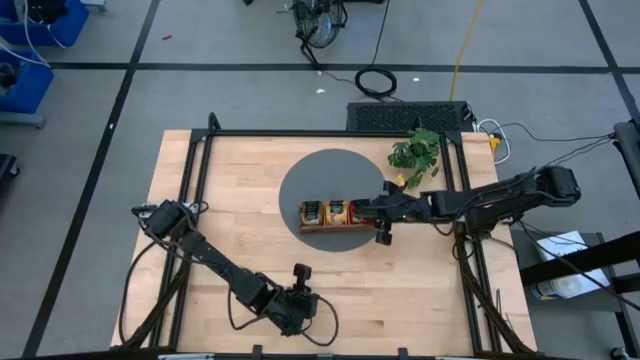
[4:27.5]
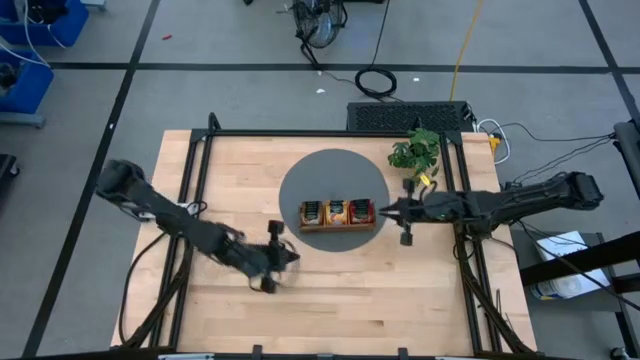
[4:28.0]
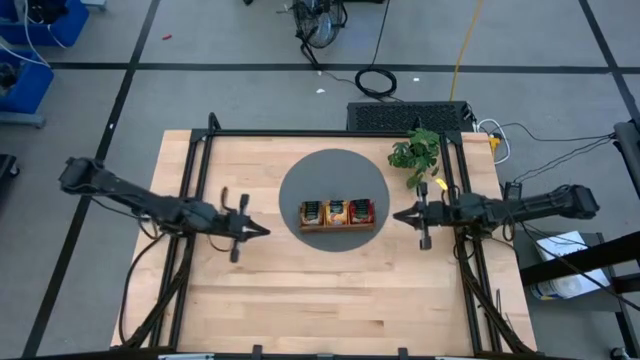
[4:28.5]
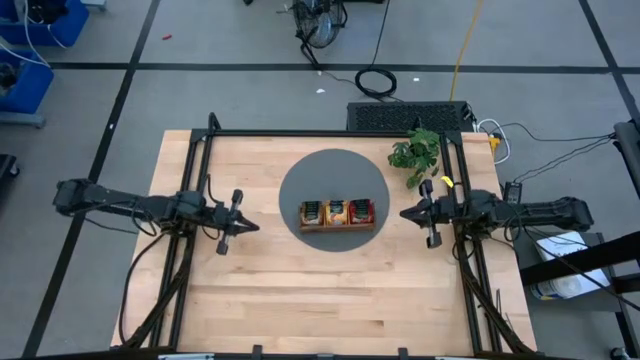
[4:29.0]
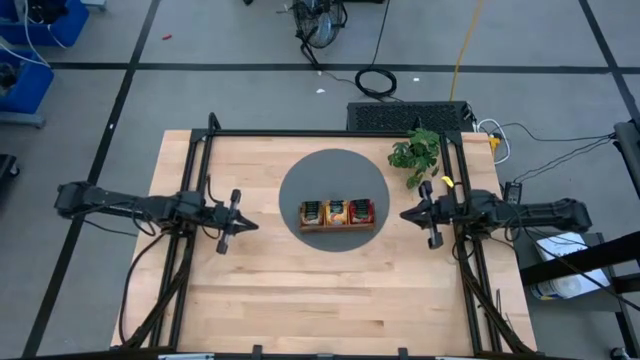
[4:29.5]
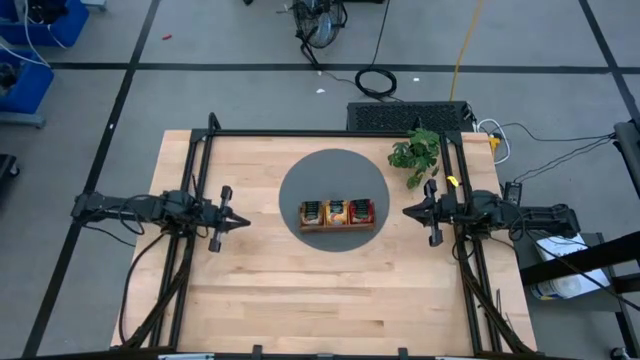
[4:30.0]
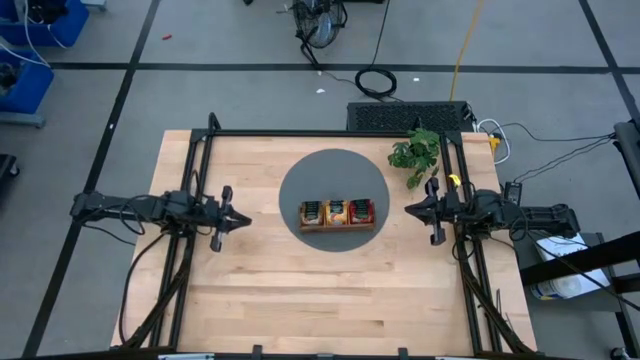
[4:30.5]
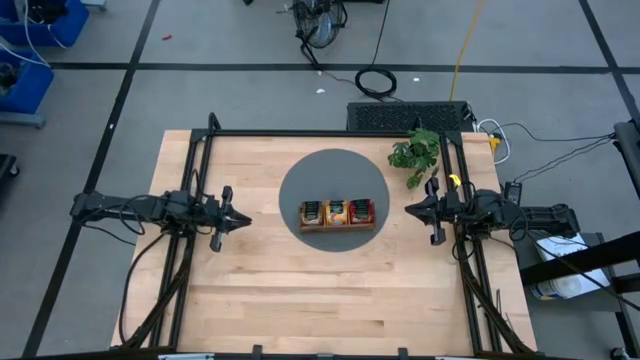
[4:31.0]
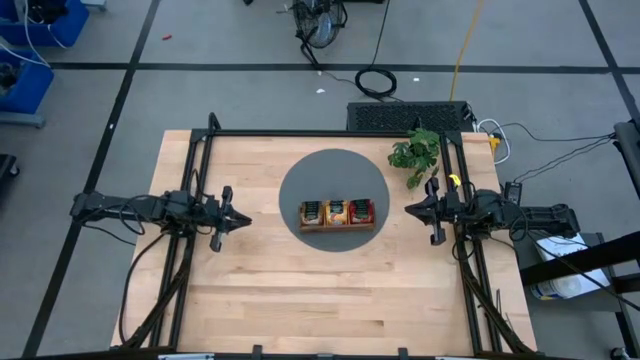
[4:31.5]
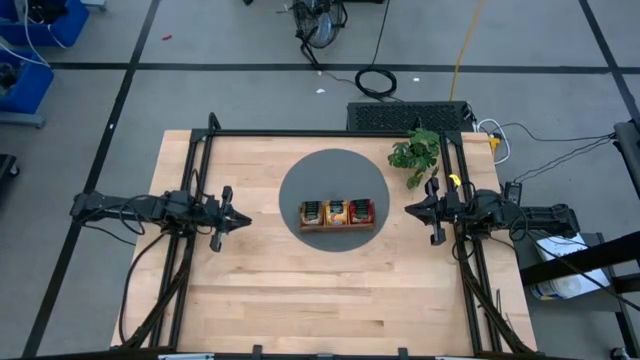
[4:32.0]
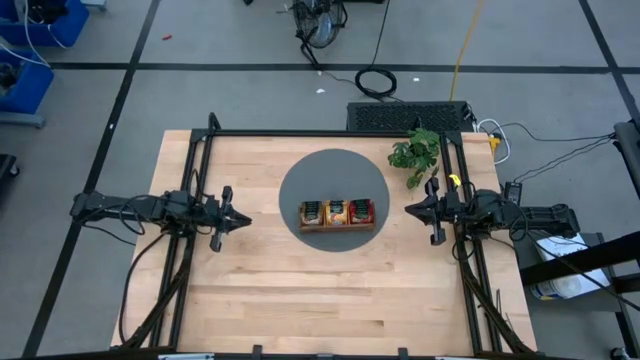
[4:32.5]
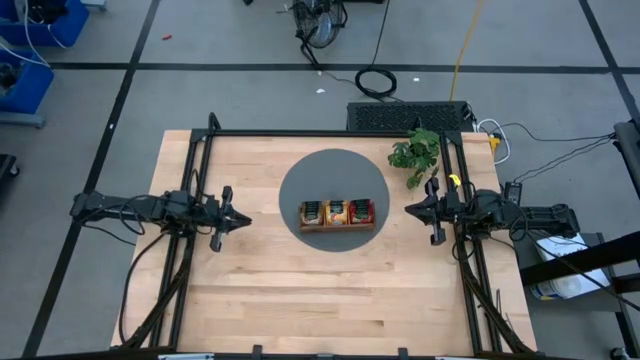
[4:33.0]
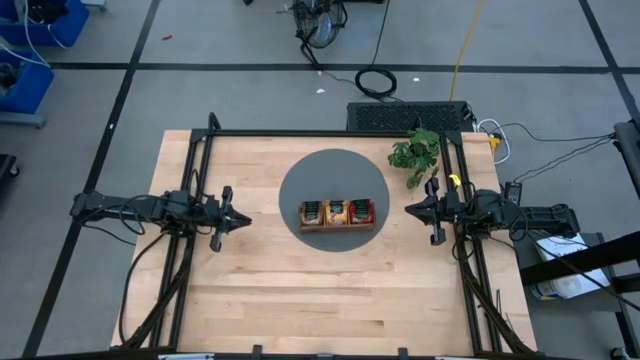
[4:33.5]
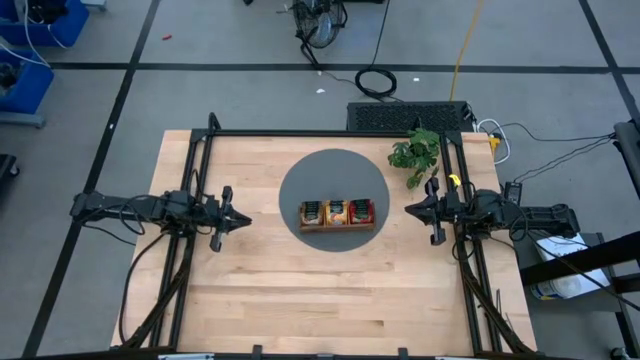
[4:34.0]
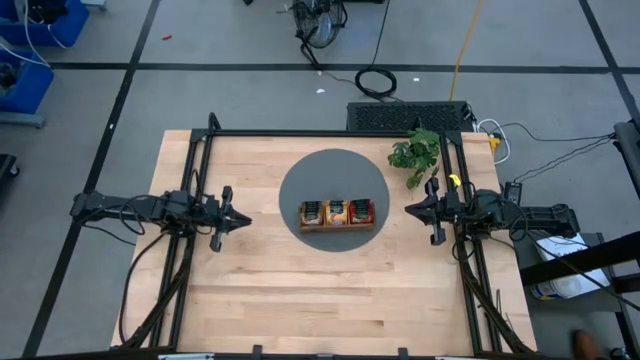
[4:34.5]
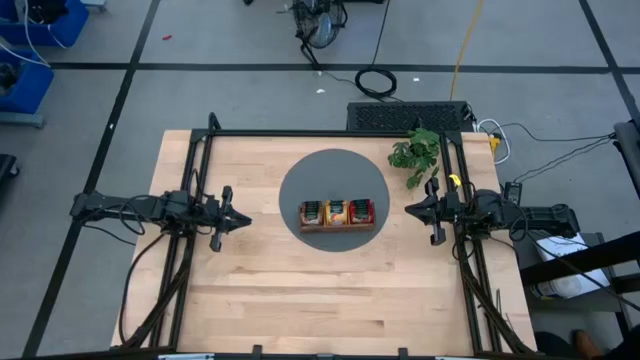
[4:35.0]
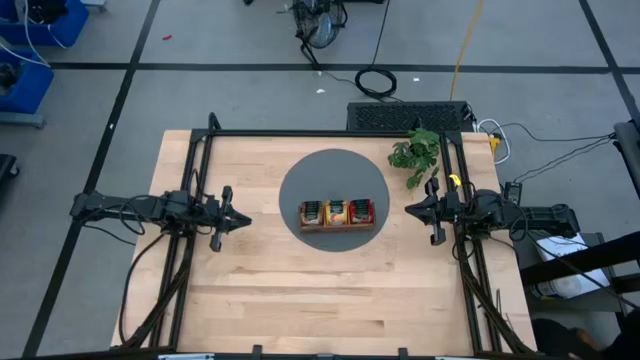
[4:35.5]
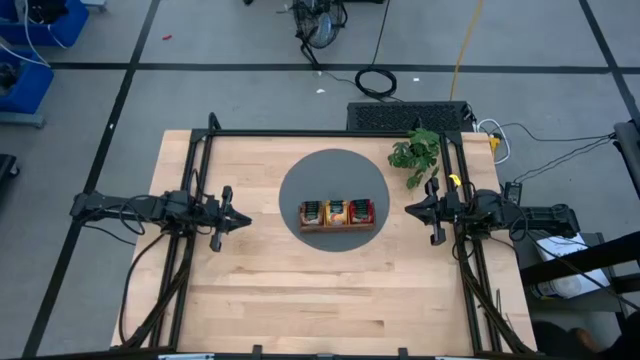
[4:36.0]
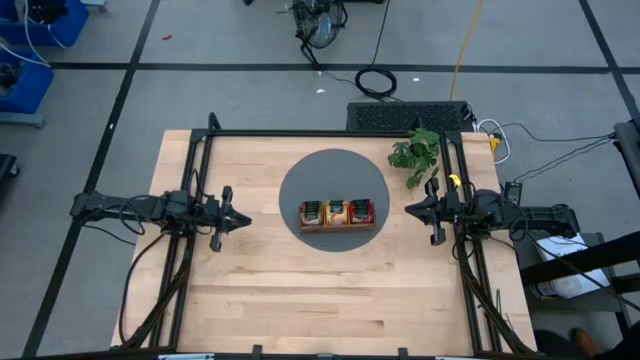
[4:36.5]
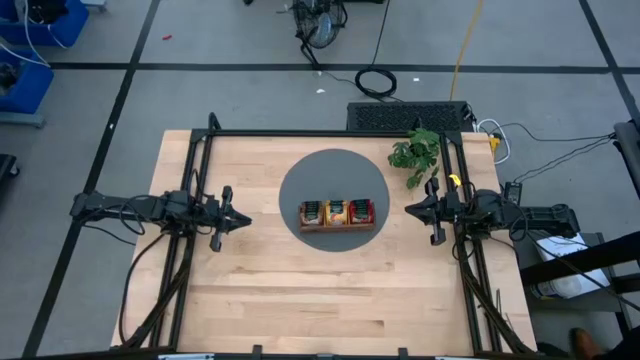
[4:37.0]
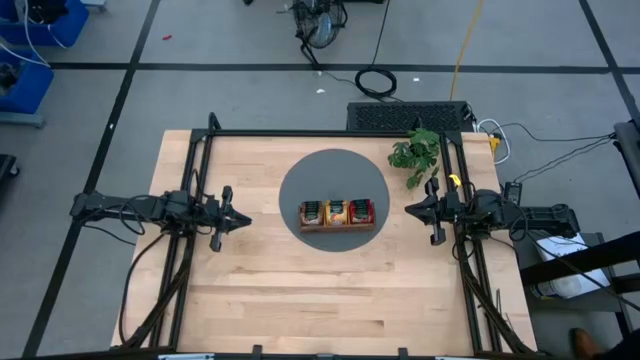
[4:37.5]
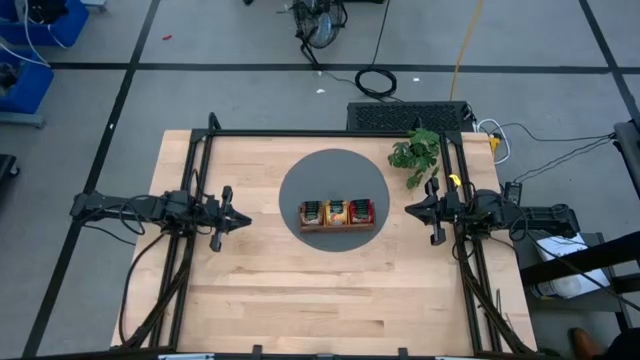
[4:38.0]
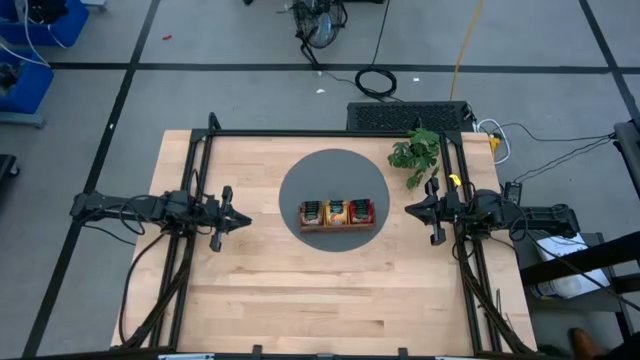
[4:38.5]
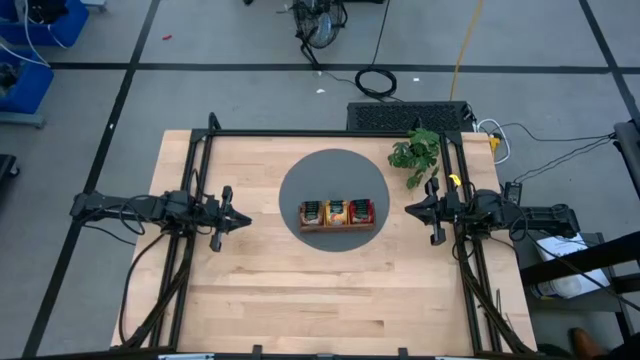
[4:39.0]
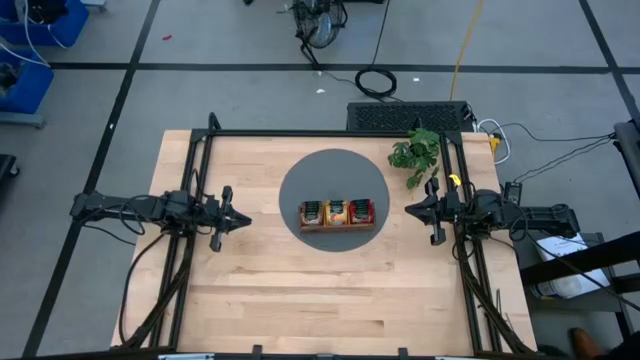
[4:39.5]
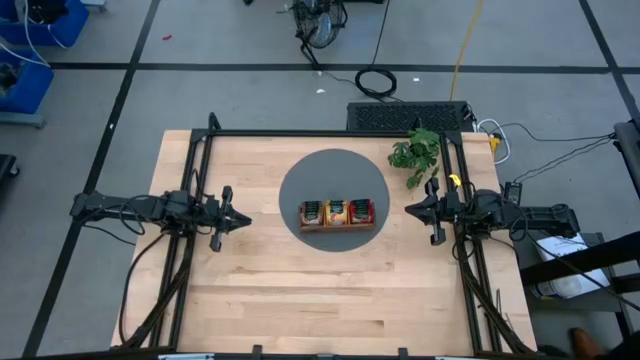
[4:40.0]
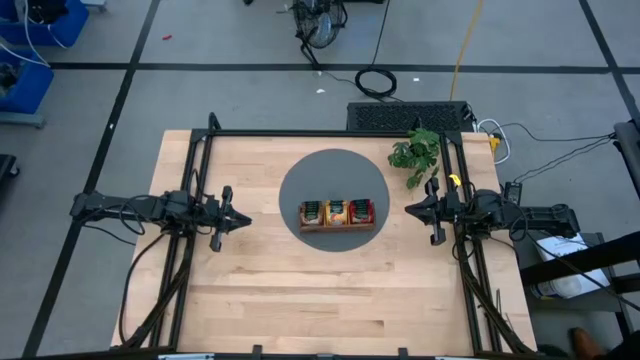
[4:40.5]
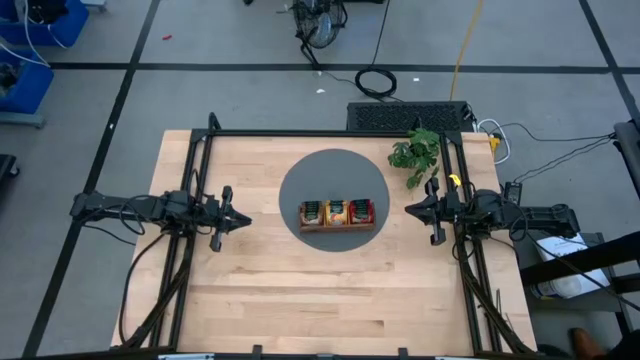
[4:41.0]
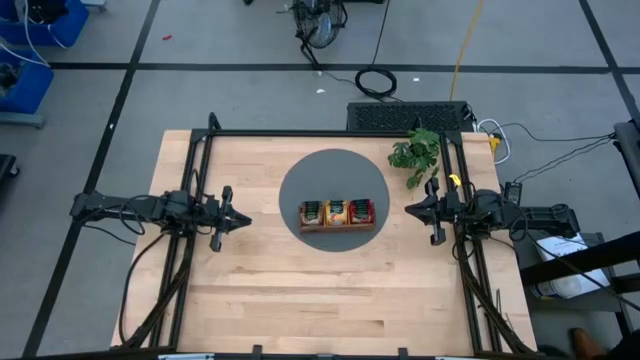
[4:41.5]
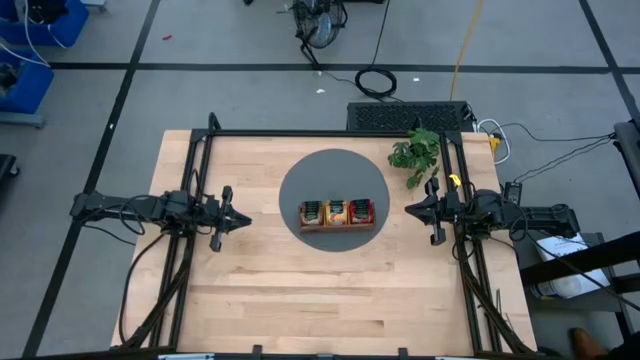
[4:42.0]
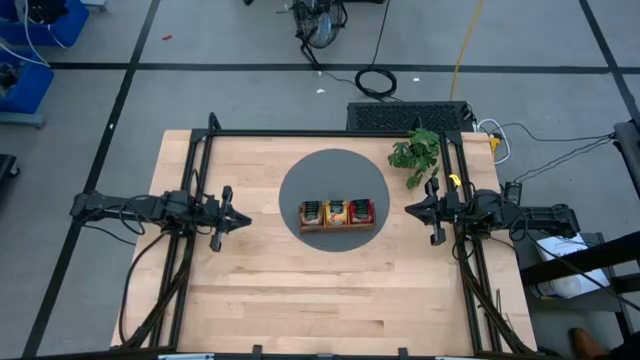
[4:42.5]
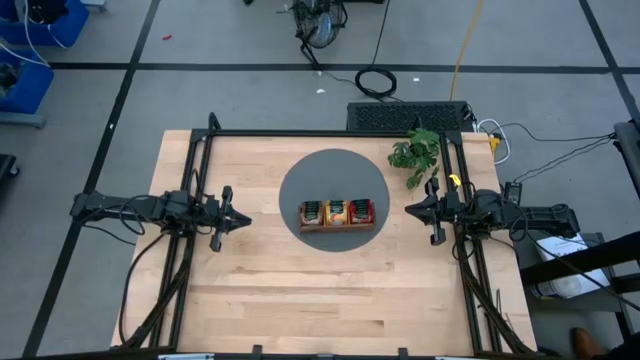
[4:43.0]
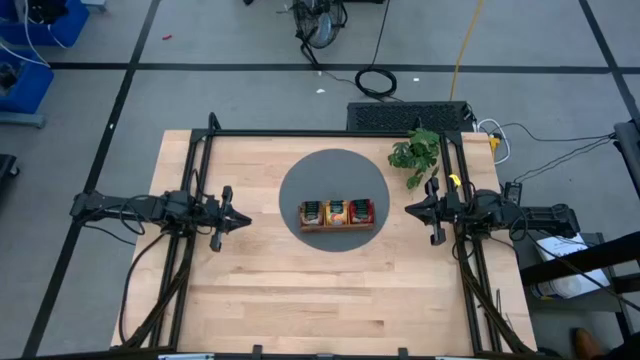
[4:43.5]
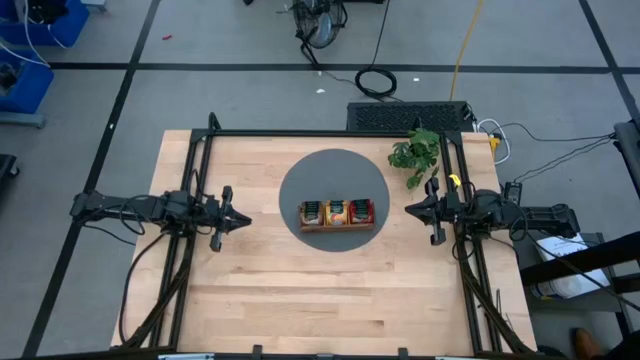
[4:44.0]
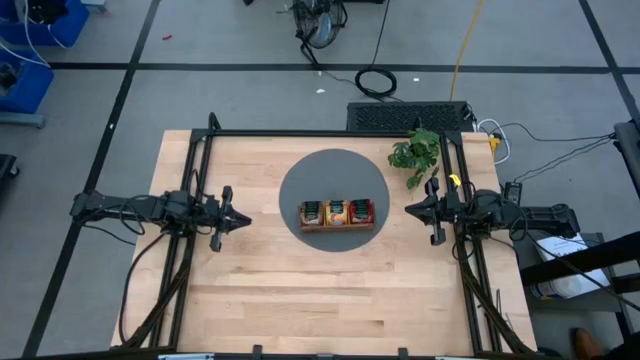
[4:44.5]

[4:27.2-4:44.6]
Task: Pick & Place Tea
Return to Home Position

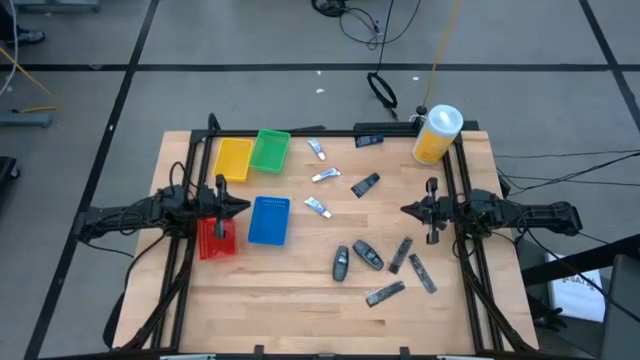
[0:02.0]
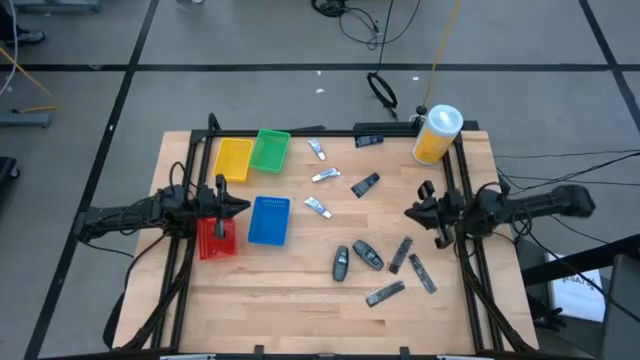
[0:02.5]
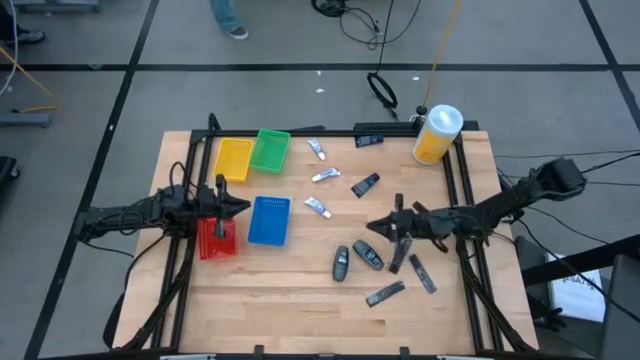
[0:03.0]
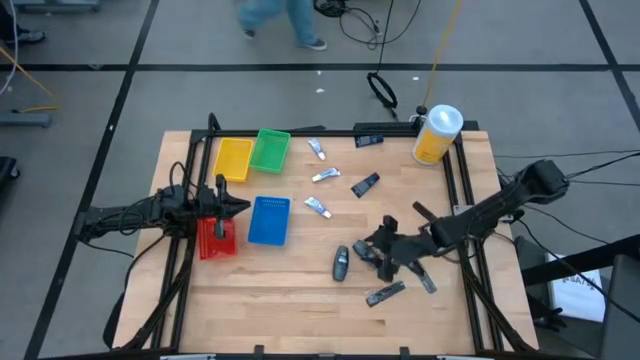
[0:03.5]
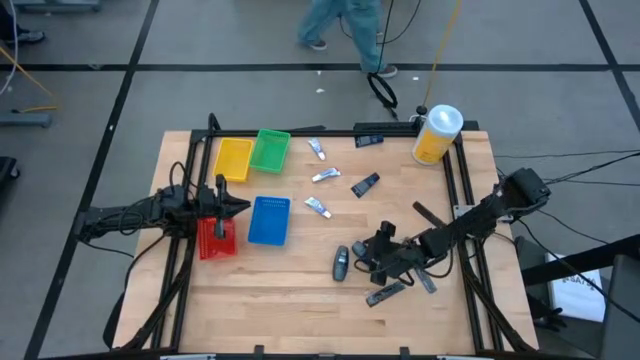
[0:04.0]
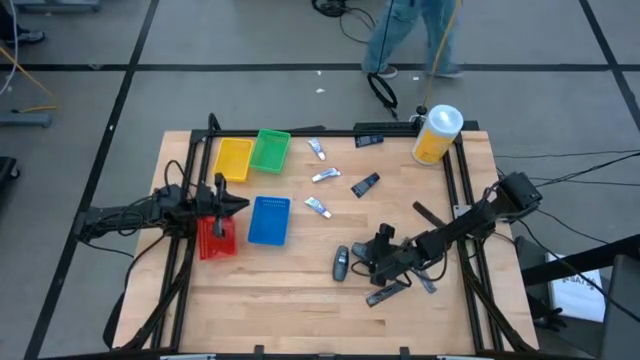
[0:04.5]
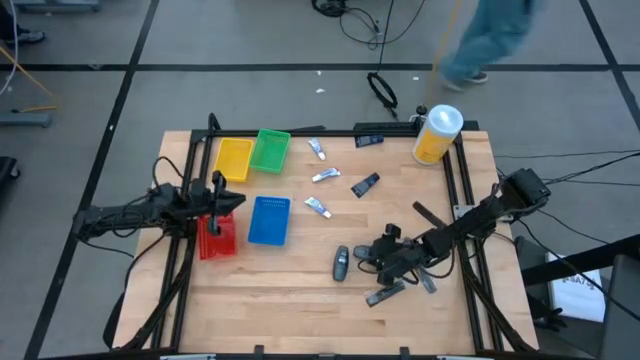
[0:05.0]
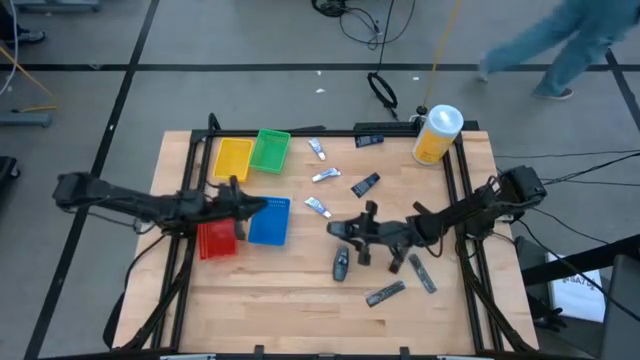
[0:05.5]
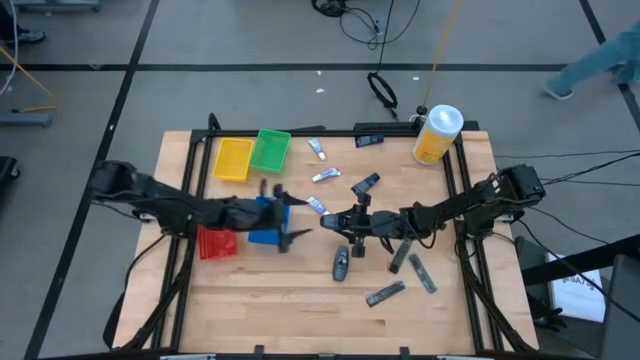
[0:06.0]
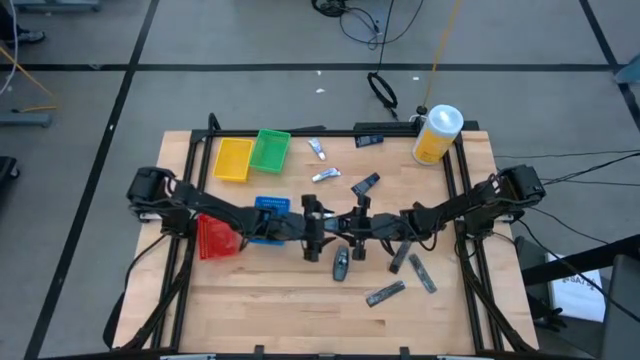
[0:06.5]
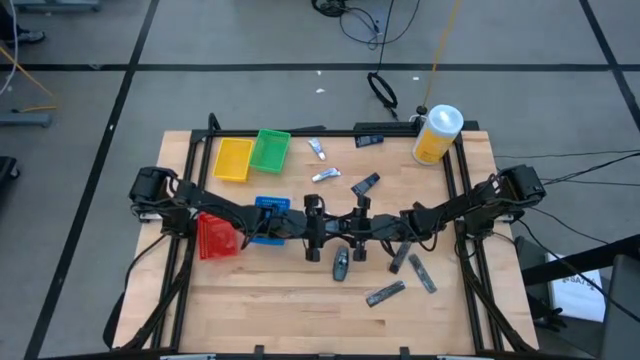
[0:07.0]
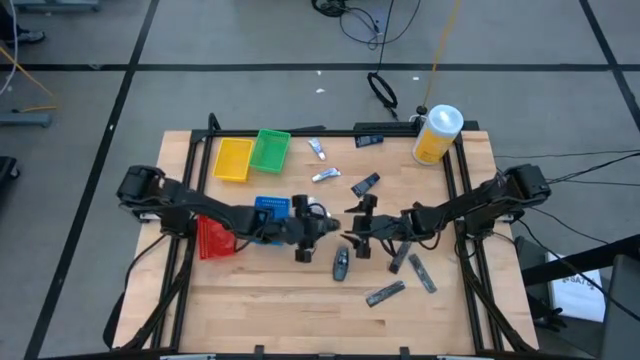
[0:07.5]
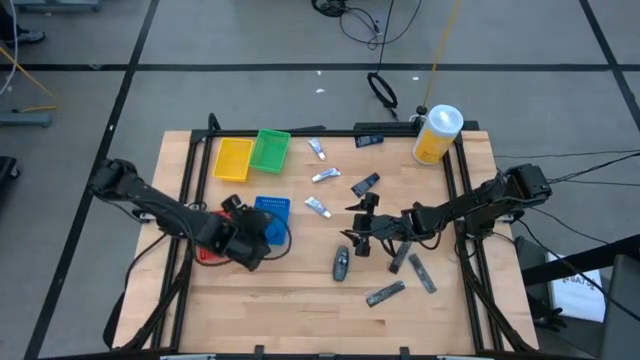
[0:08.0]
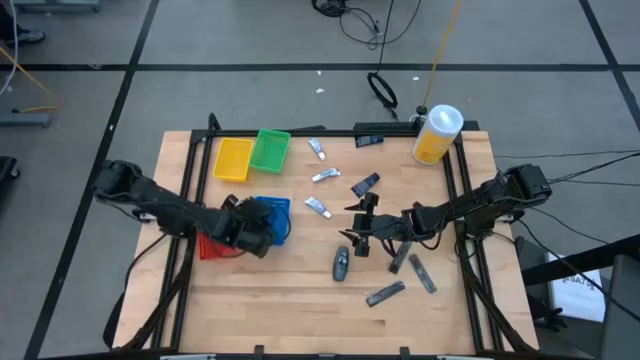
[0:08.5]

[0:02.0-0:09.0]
Task: Pick & Place Travel size toiletries
Put the gray deodorant into the blue bin
